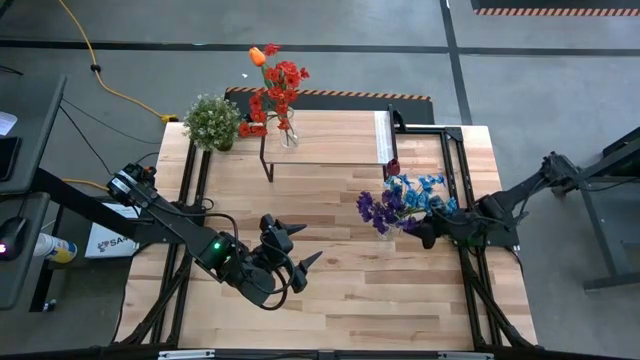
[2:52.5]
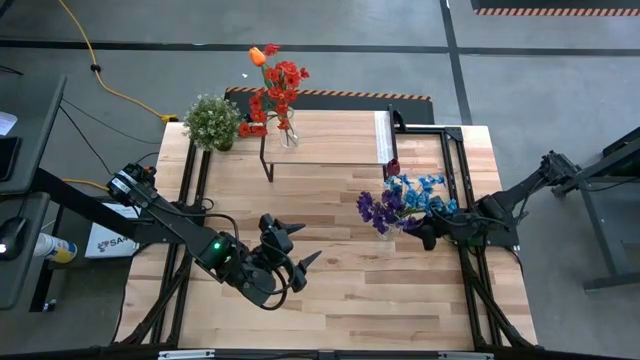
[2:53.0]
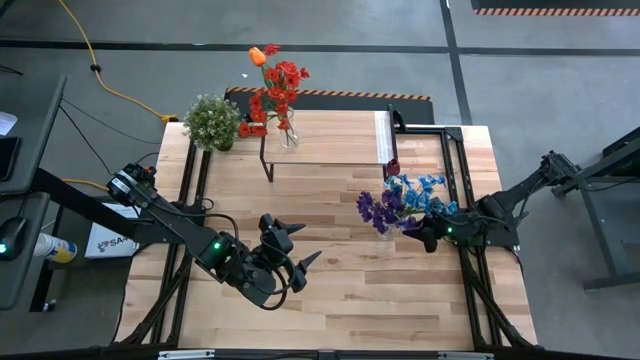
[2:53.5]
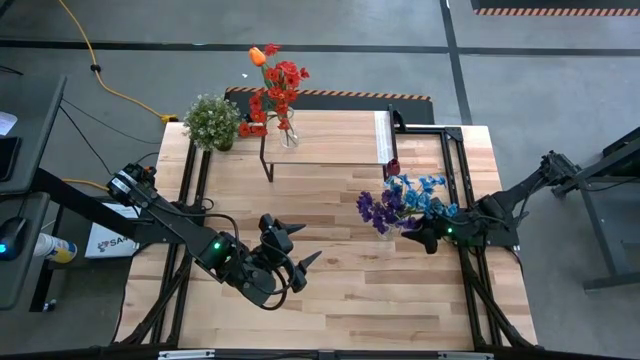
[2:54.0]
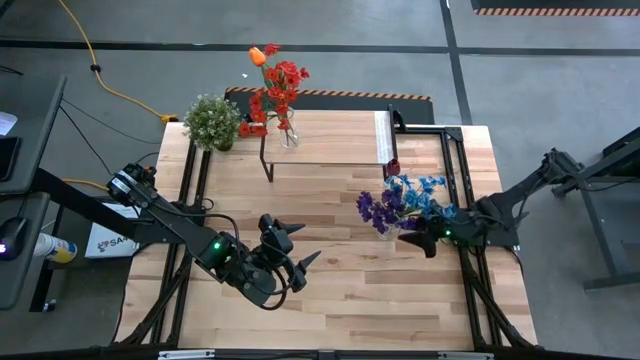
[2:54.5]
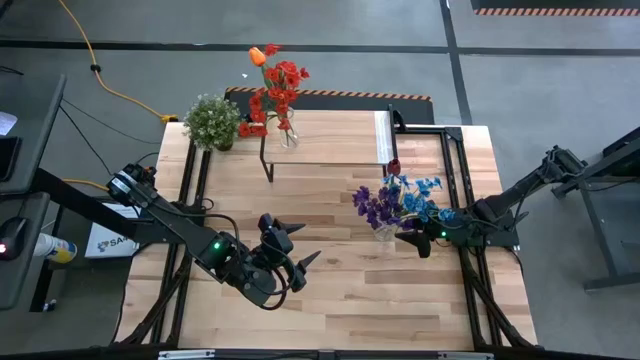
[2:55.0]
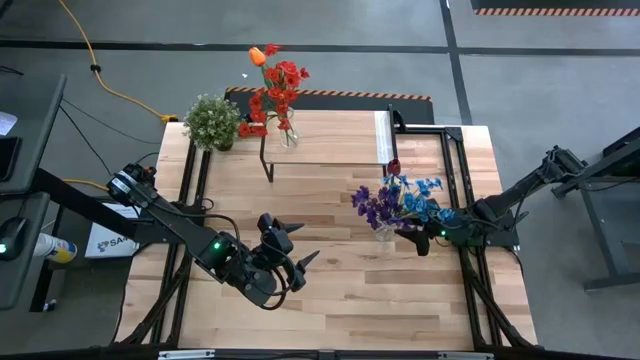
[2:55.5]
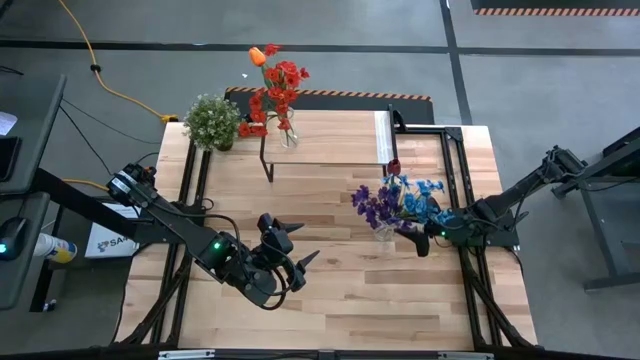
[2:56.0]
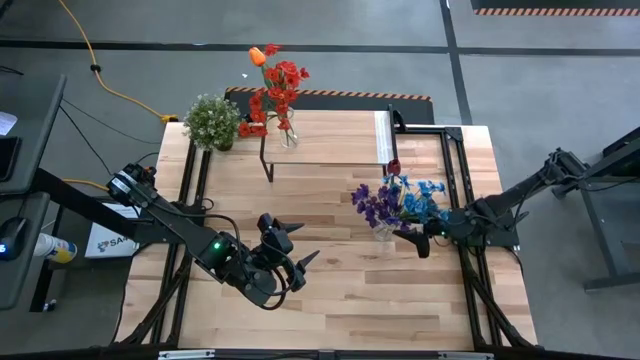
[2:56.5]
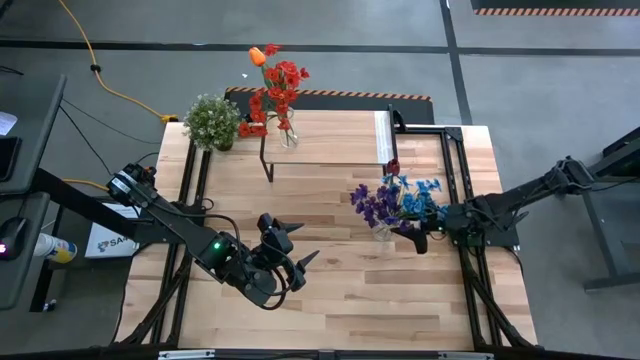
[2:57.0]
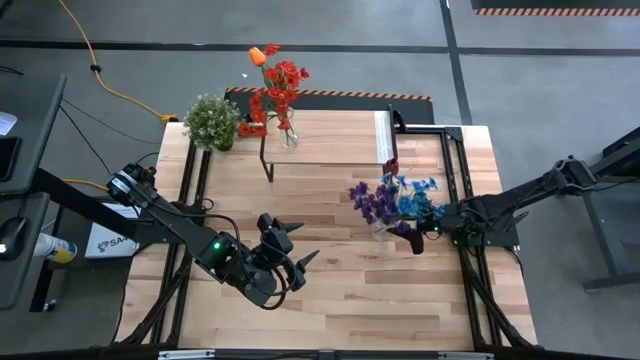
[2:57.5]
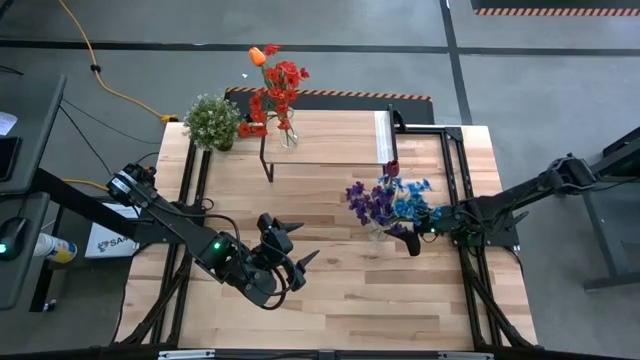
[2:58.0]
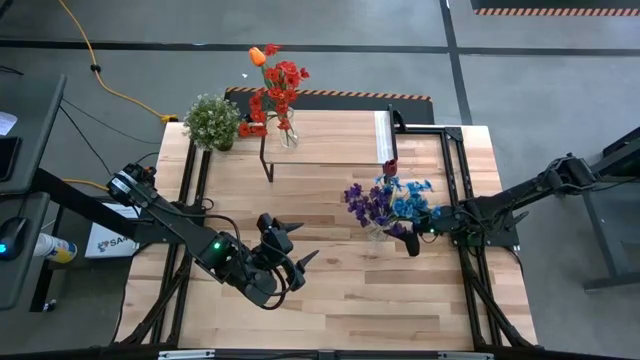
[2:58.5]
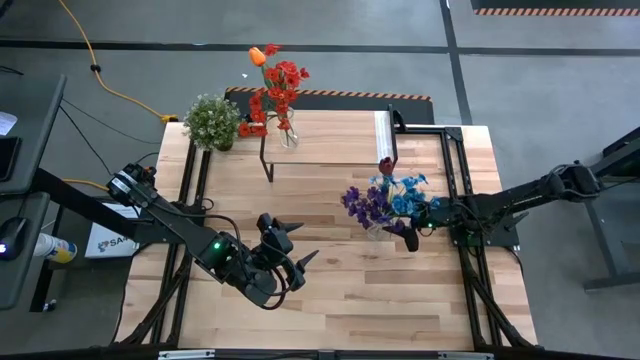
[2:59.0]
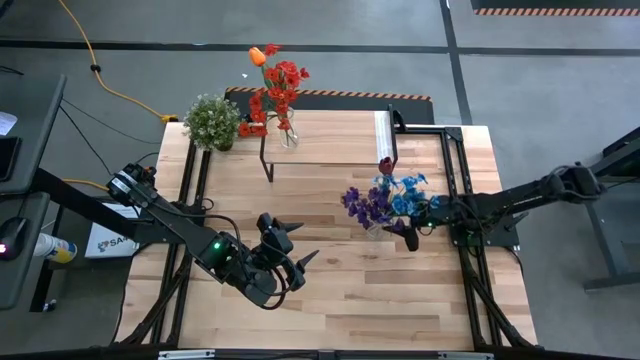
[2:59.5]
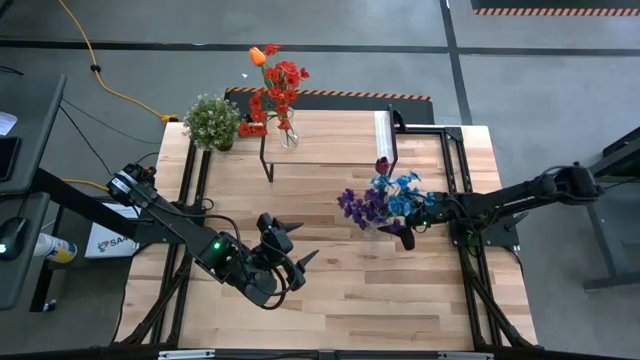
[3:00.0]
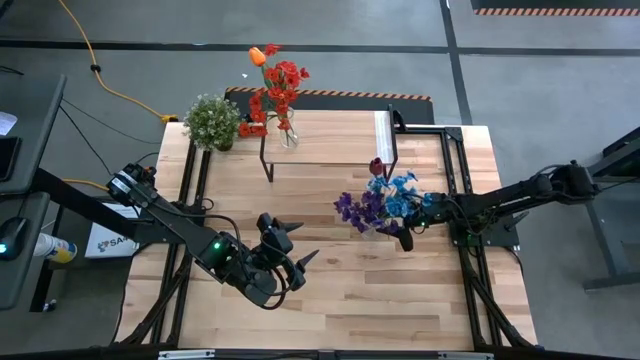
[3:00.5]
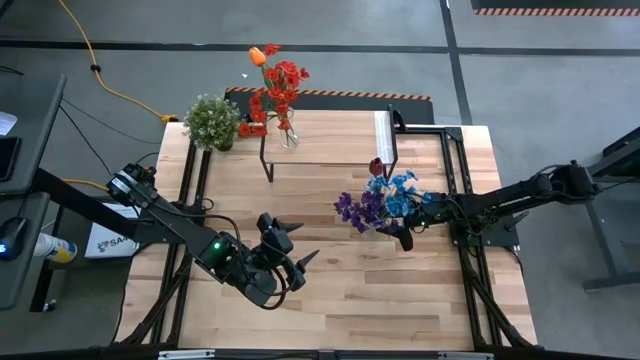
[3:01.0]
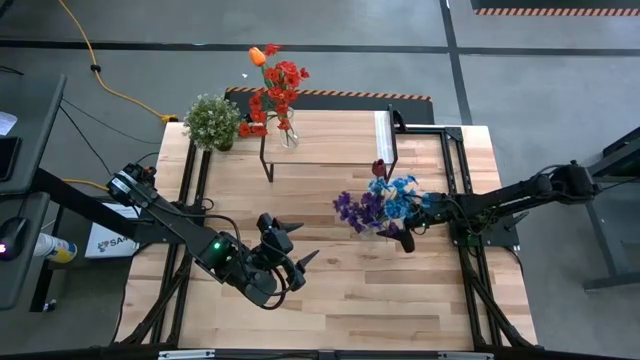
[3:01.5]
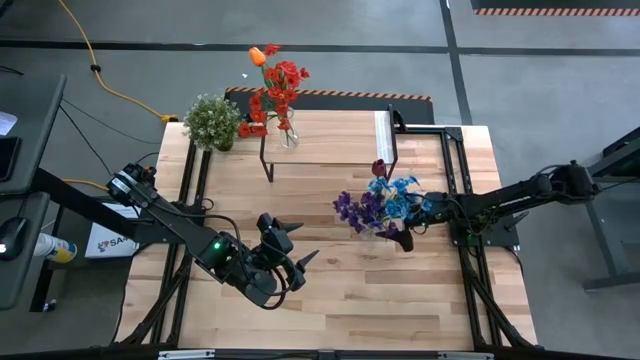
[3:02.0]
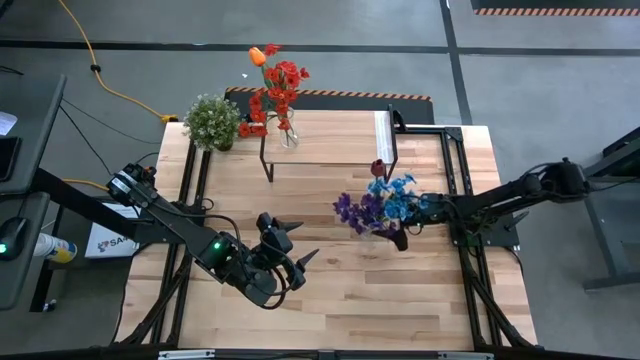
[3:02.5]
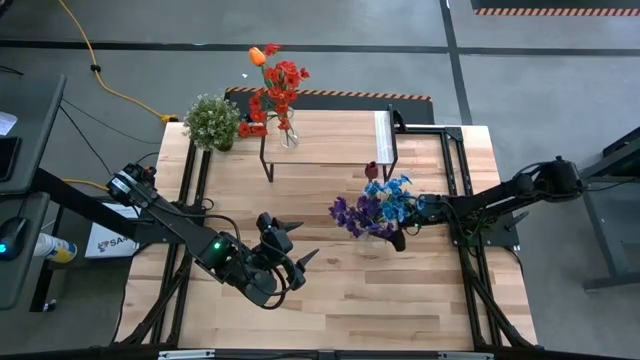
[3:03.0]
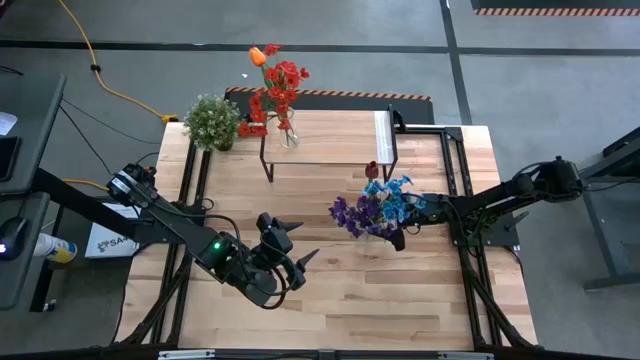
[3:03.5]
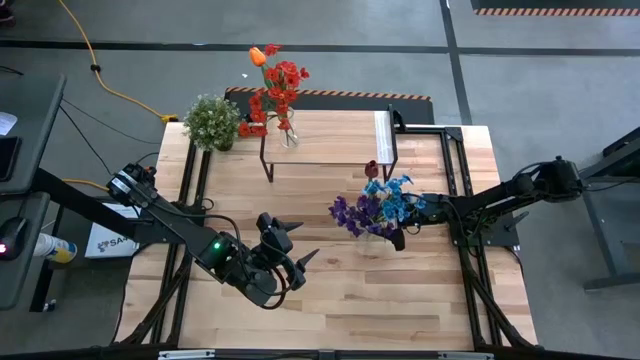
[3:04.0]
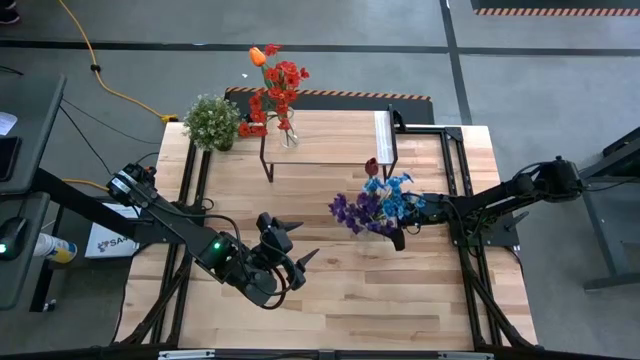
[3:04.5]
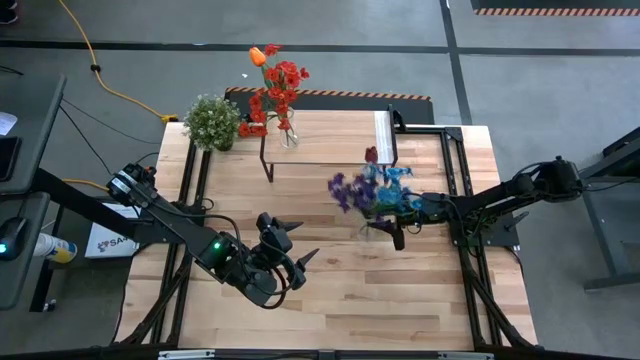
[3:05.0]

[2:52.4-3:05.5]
Task: Pick and place flowers into a vace then onto a shelf
Put the right transparent vase on the shelf

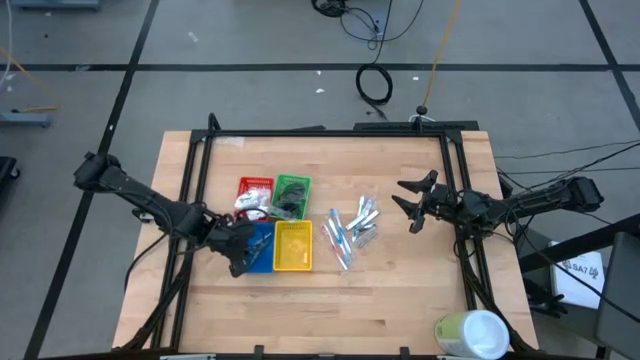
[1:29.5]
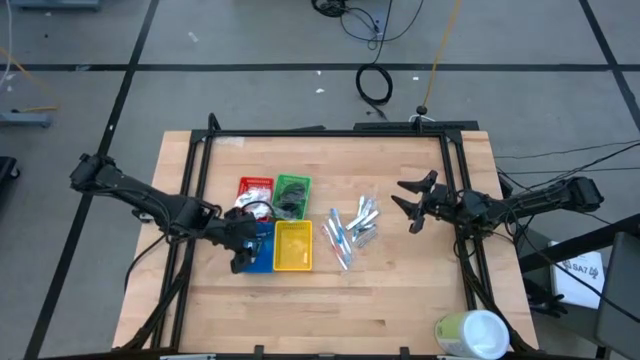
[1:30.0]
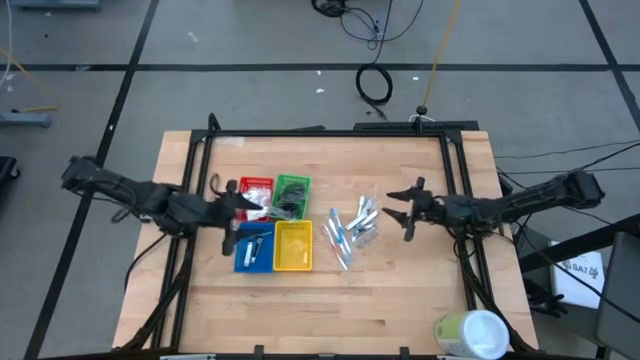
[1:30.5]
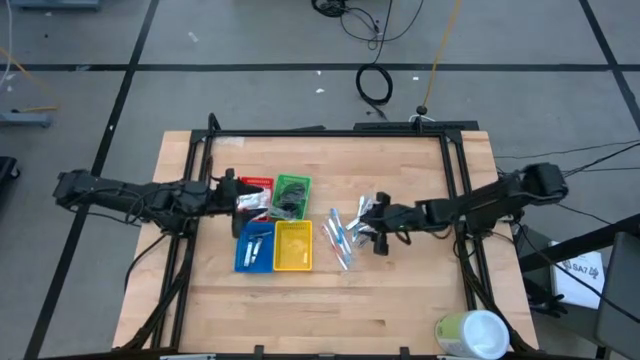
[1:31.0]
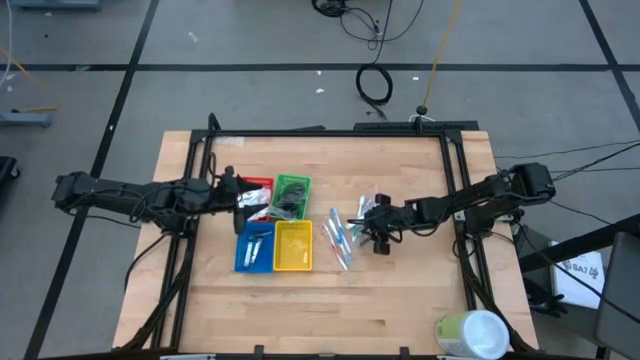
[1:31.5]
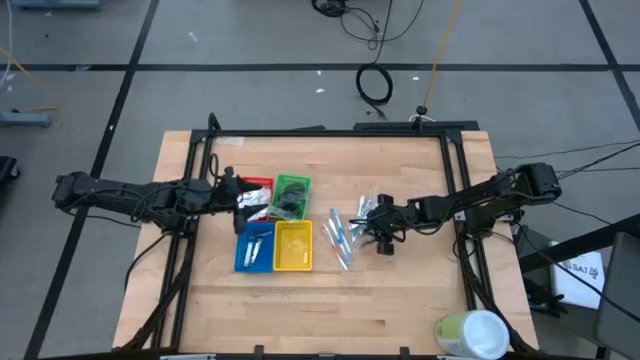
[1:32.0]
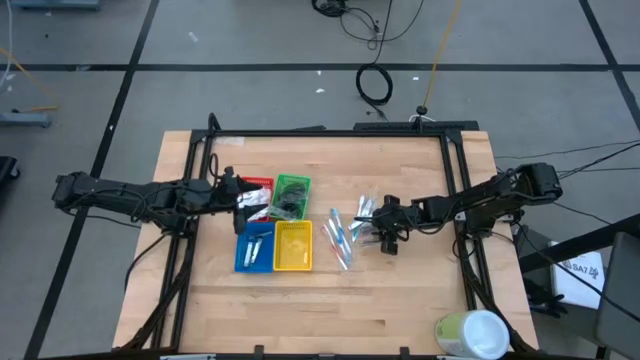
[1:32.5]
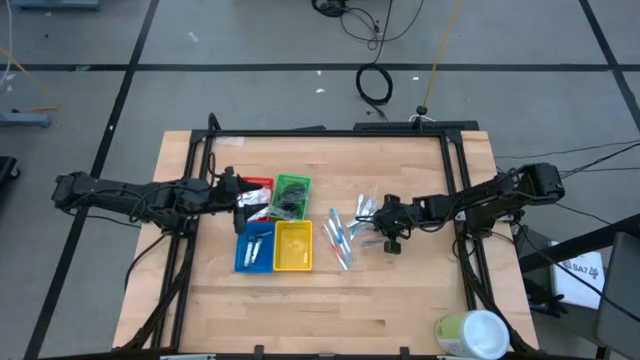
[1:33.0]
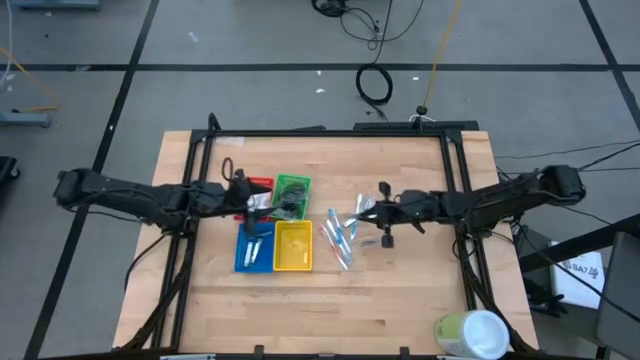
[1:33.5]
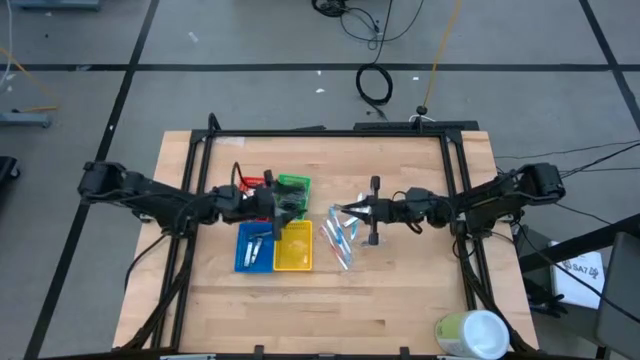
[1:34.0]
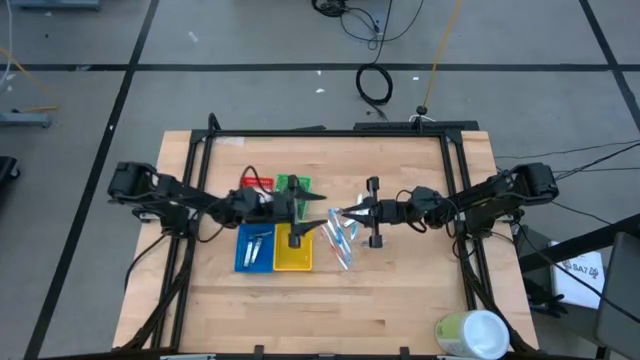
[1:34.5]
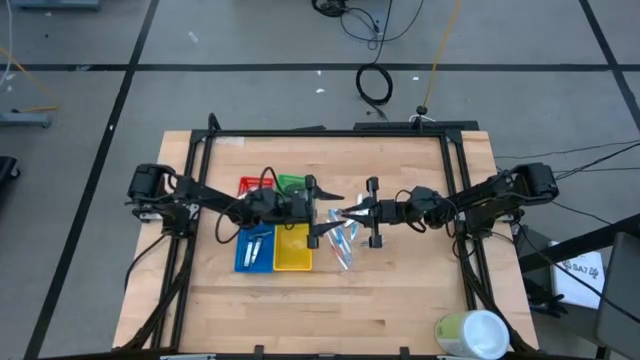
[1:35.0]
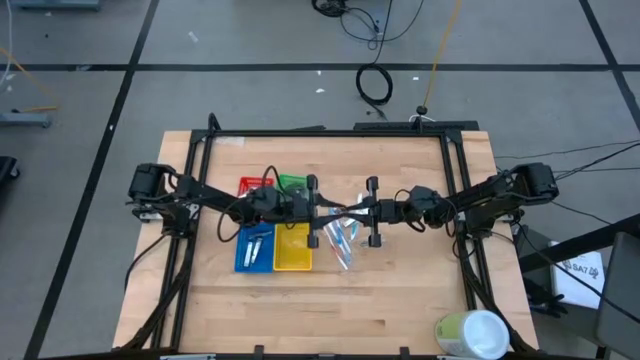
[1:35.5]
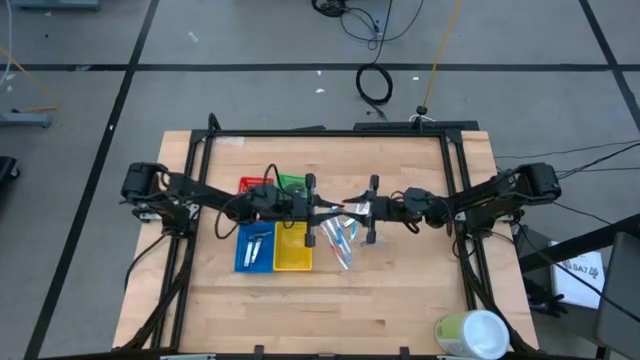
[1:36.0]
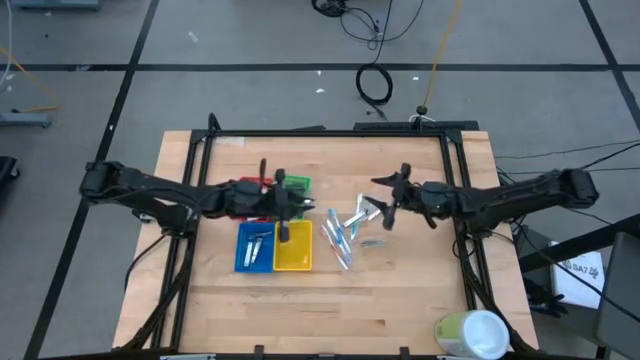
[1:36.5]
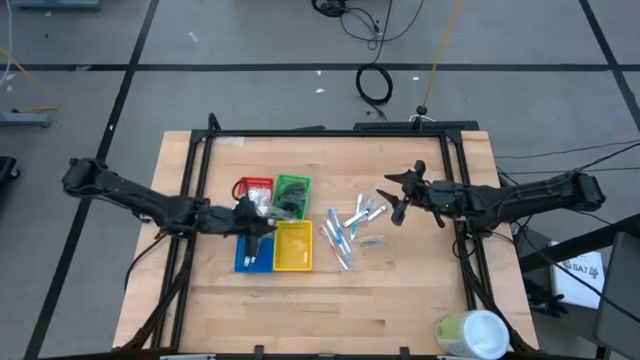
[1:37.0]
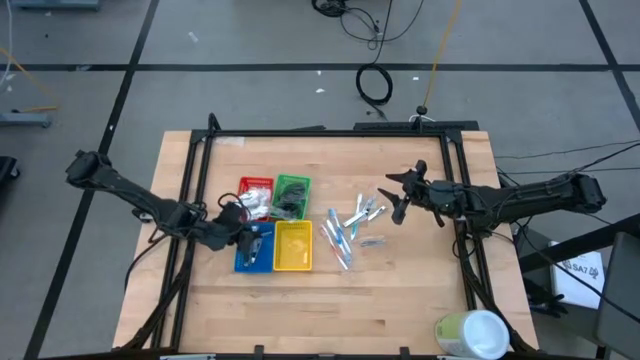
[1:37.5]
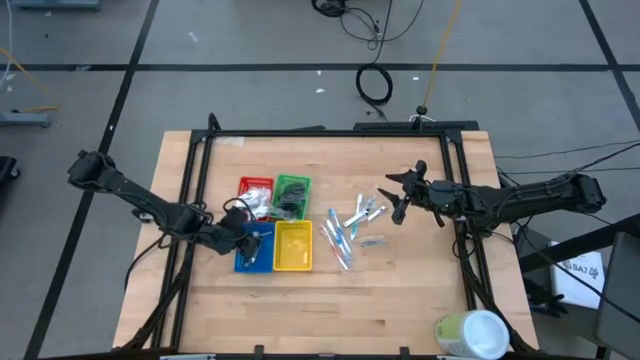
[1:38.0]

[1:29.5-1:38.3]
Task: Pick & Place Travel size toiletries
Put the silver nail cutter into the blue bin
